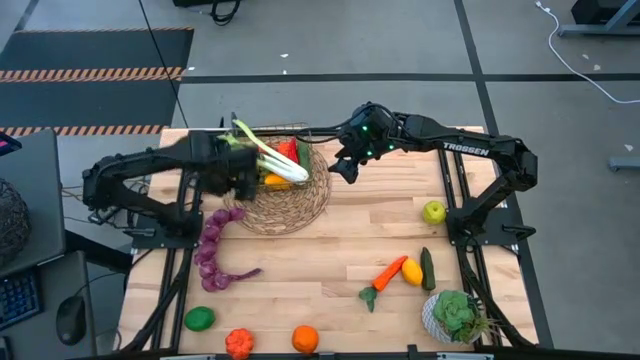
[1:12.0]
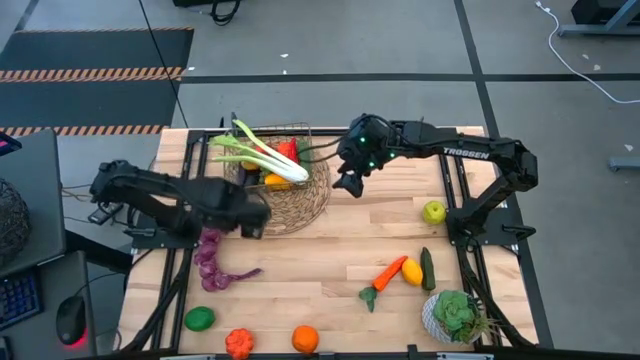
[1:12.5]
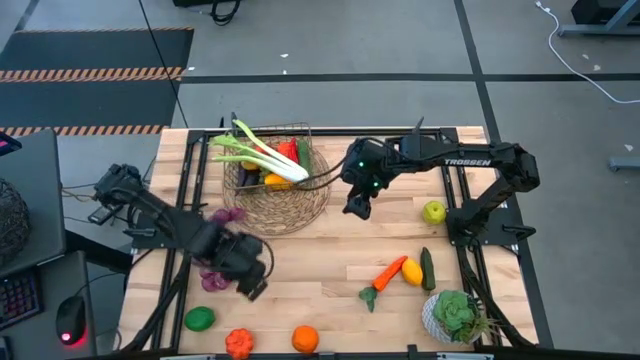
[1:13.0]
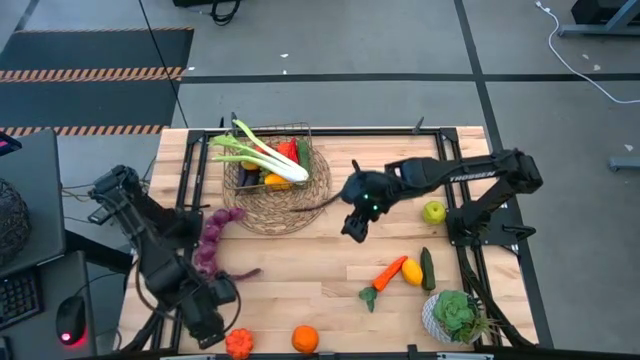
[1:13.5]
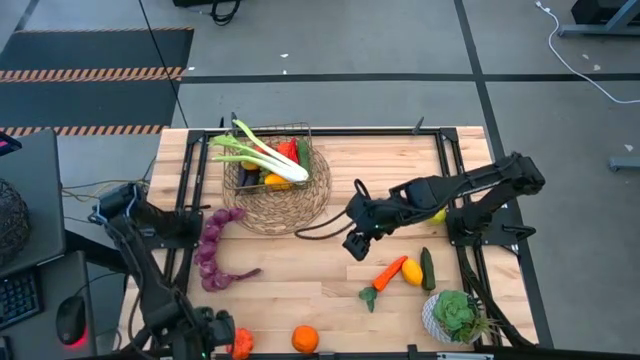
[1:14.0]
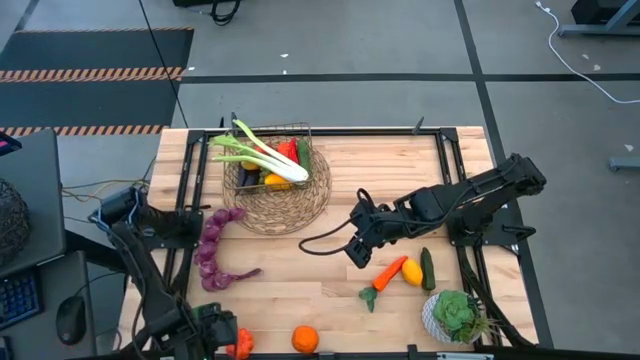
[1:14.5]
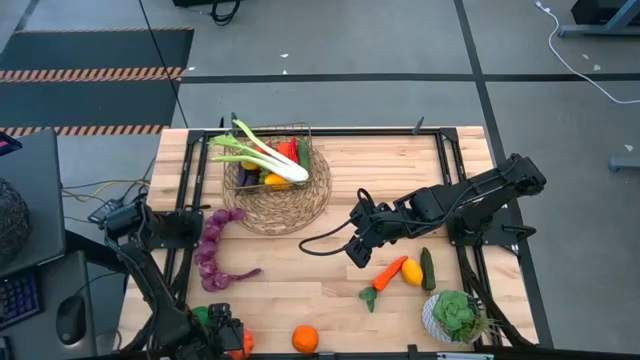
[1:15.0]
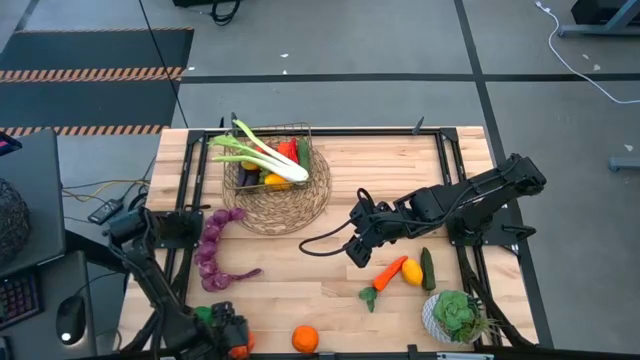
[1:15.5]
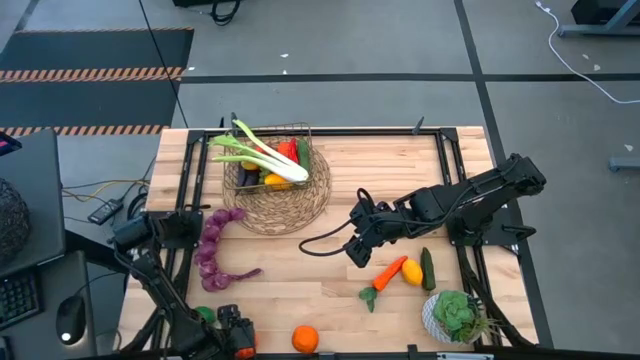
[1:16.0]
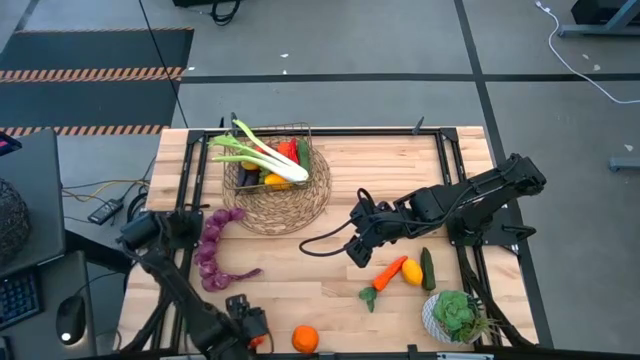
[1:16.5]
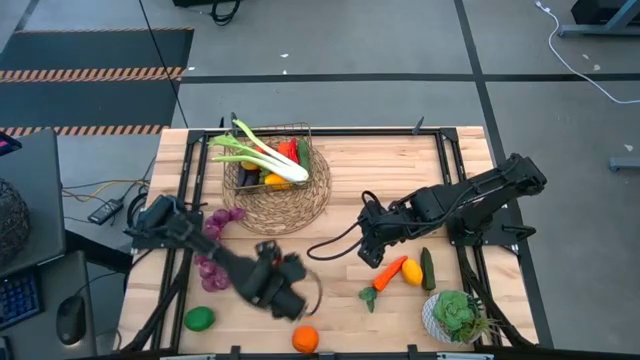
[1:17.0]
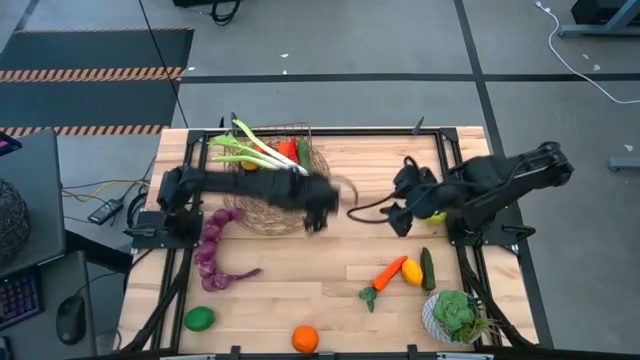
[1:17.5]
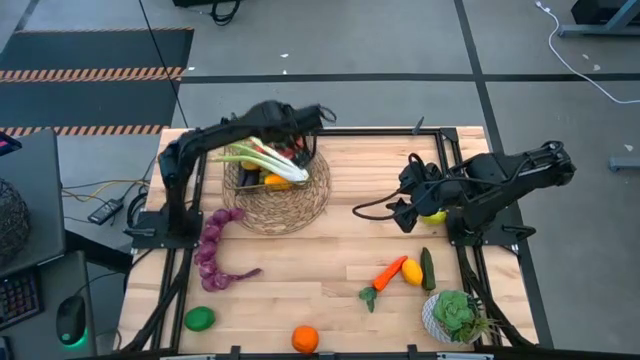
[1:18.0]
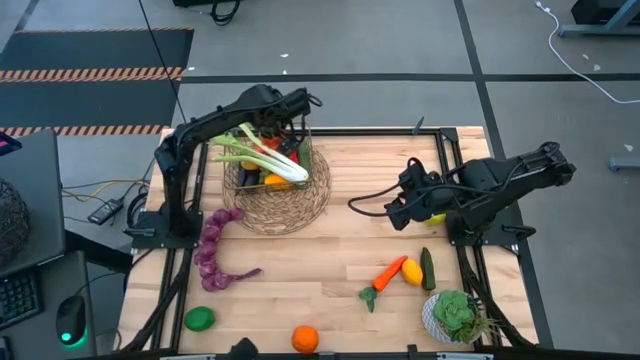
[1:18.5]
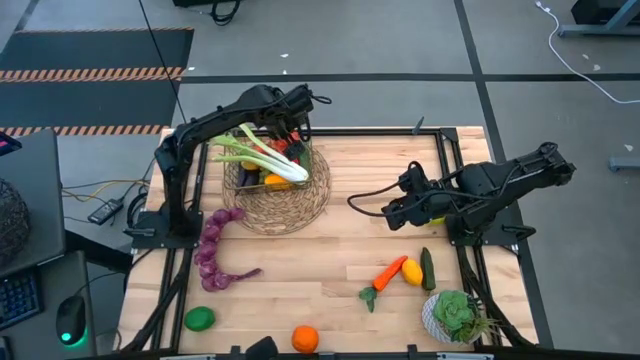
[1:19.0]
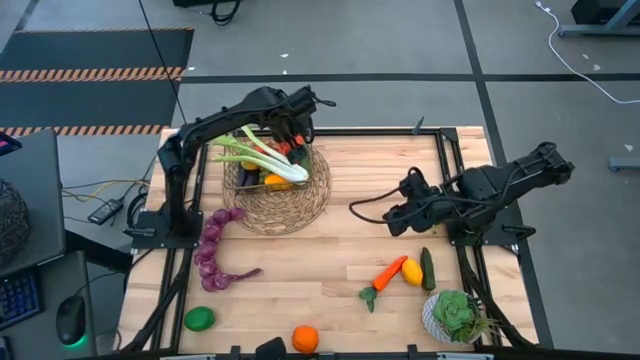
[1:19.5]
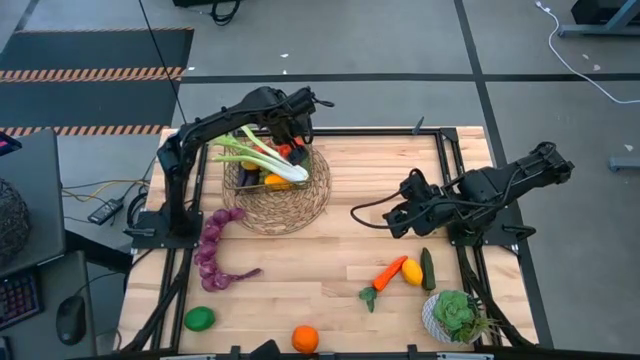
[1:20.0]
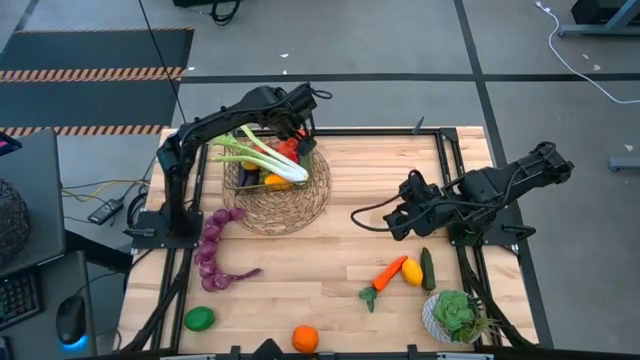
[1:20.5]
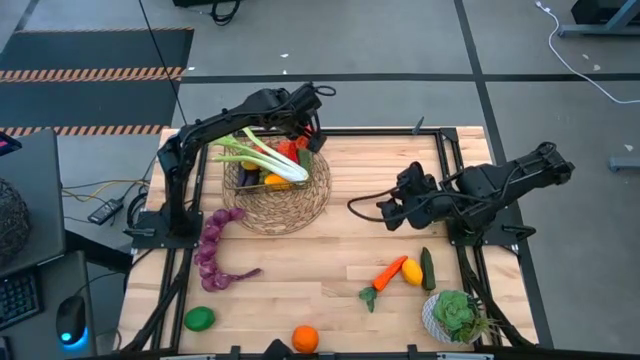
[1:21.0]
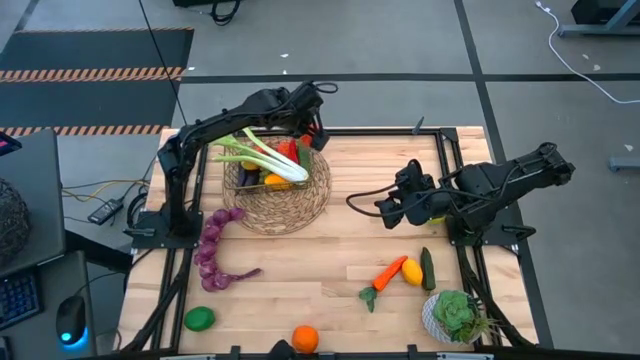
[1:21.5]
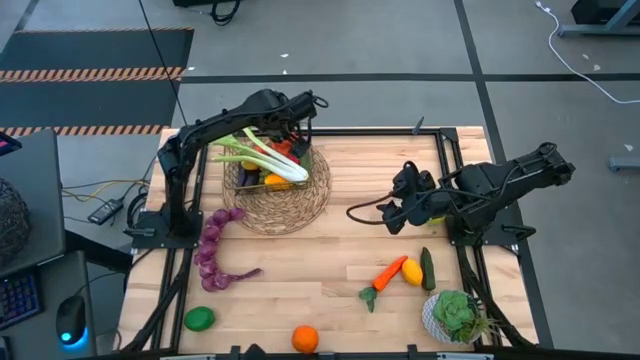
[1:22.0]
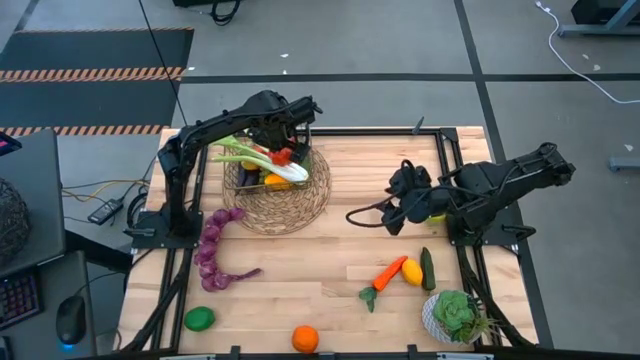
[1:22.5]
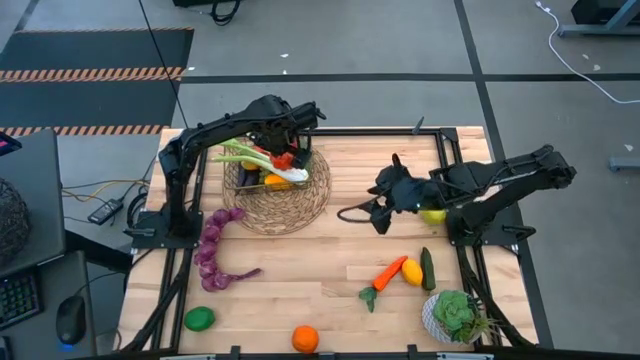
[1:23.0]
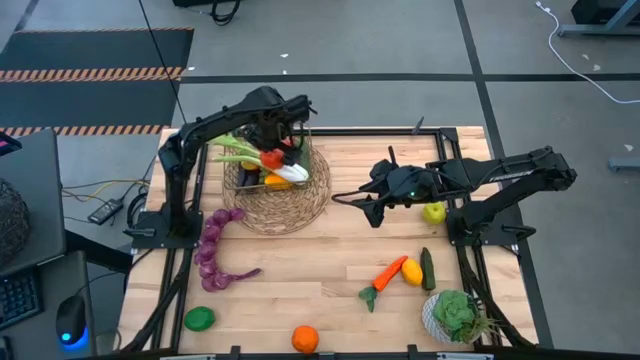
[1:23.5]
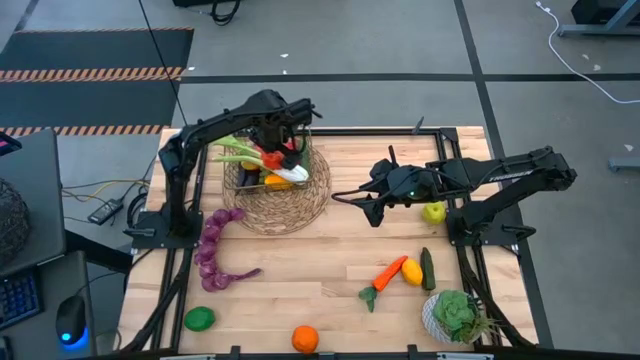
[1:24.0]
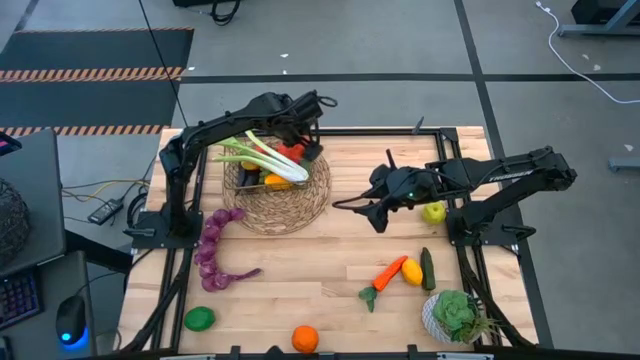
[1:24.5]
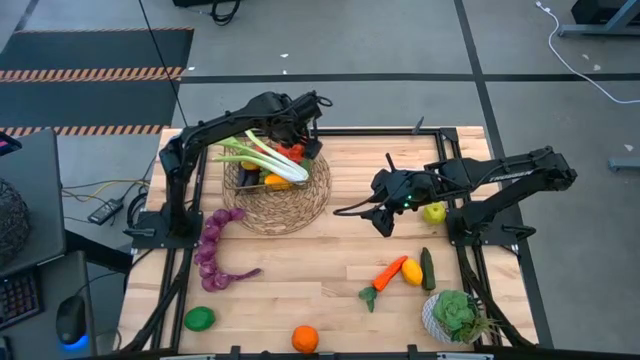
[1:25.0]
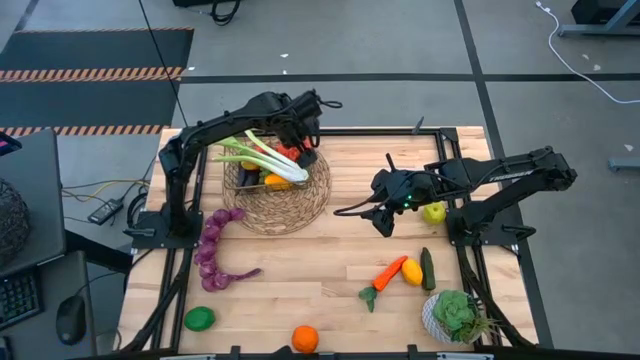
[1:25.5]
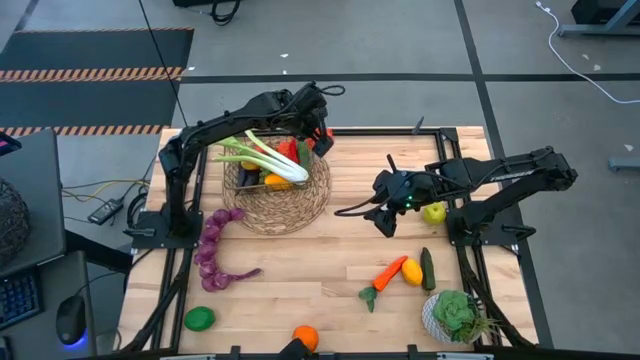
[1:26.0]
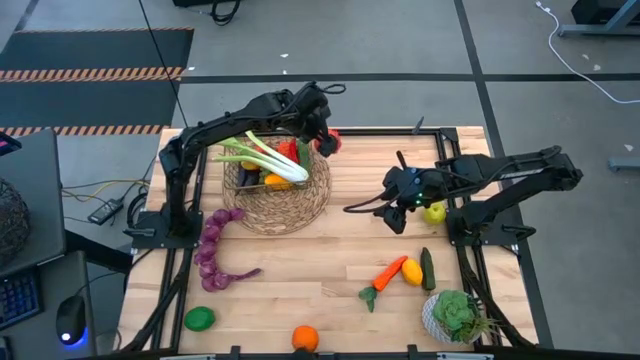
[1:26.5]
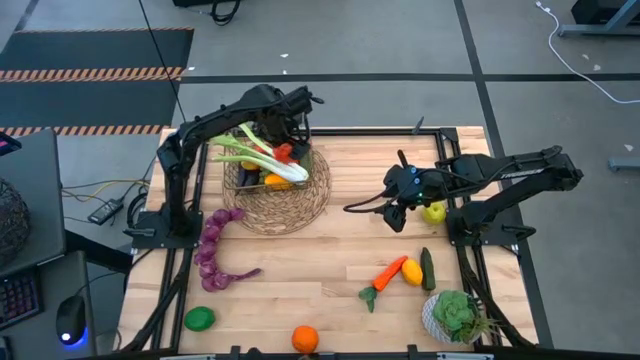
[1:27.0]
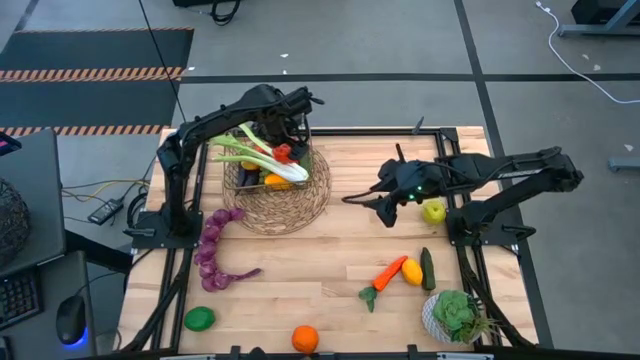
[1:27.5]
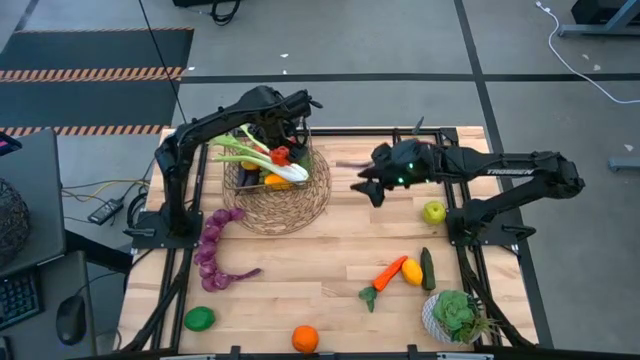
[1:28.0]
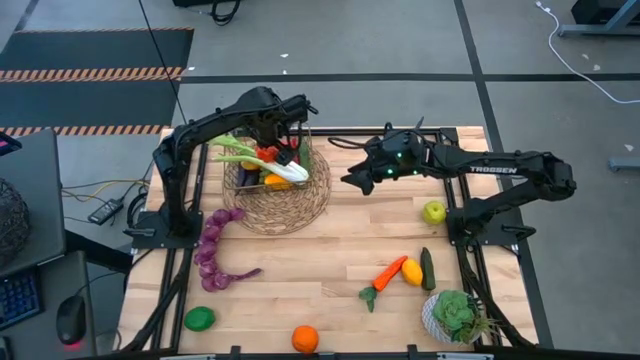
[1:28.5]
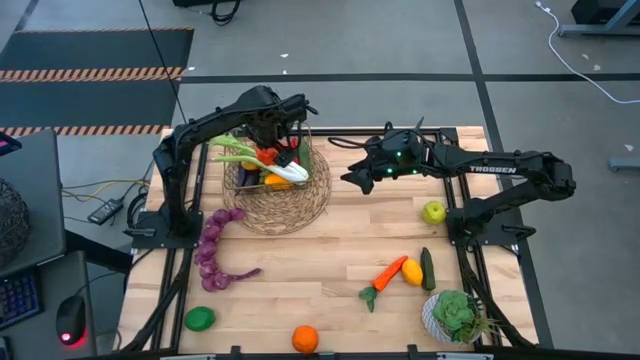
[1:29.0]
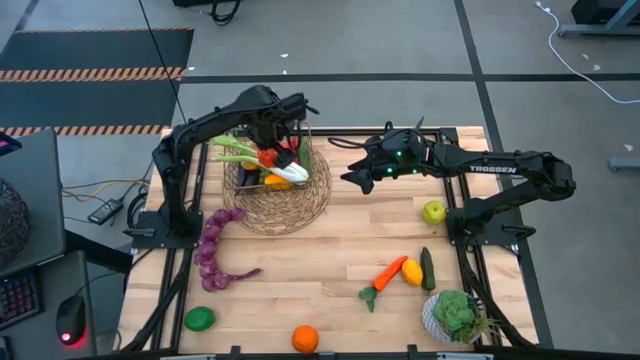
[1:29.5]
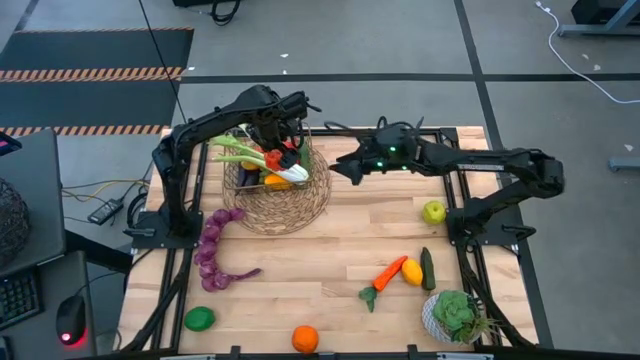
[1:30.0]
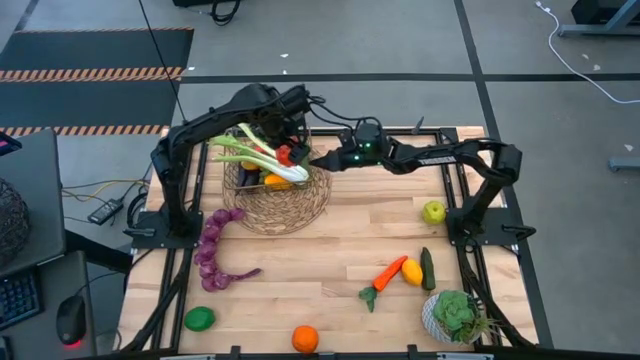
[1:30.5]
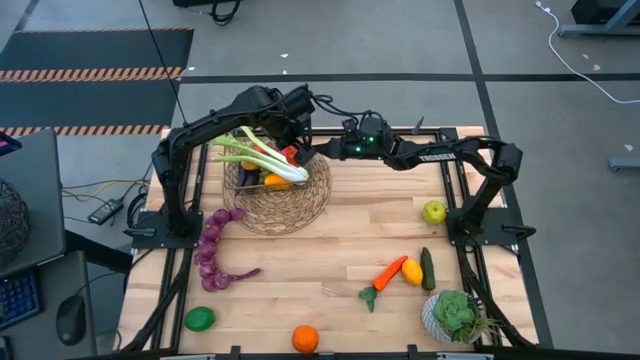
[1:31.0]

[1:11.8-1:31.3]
Task: Build produce basket
Put the orange pumpkin into the wire basket

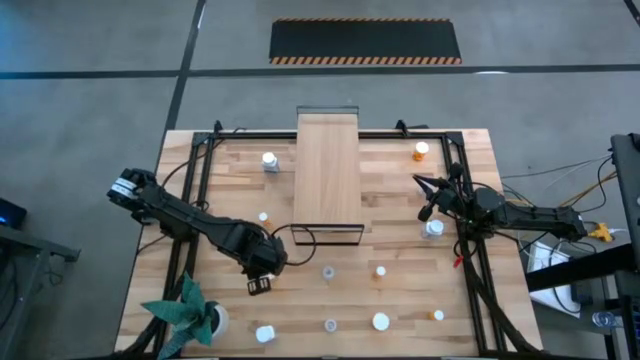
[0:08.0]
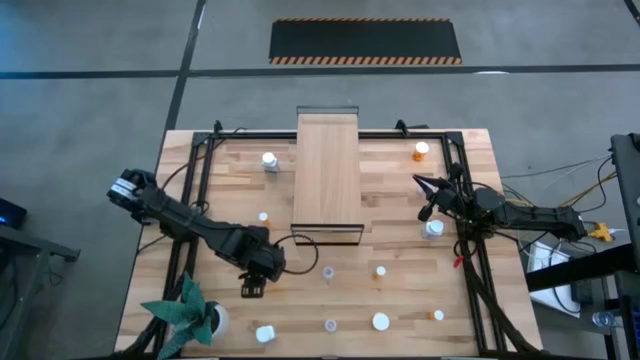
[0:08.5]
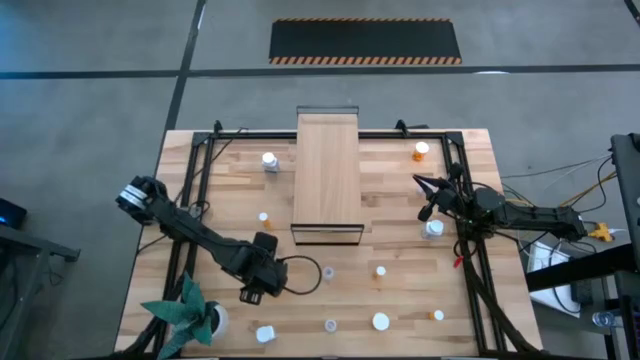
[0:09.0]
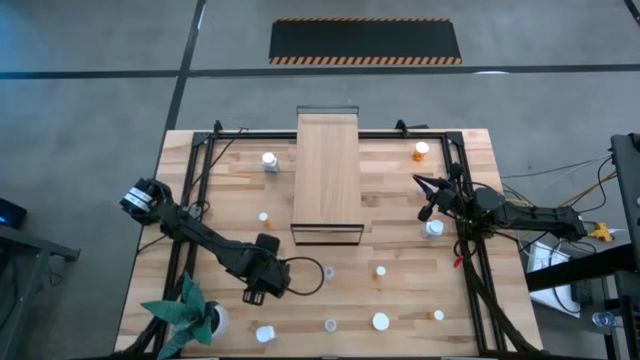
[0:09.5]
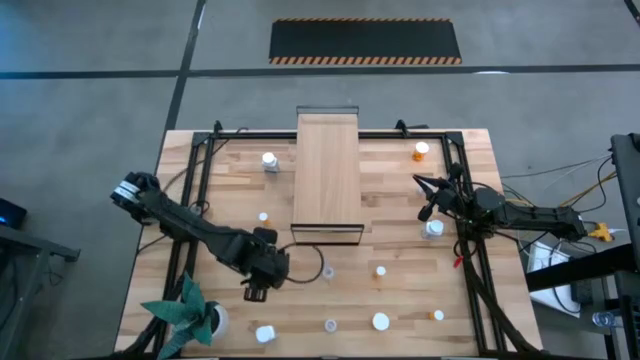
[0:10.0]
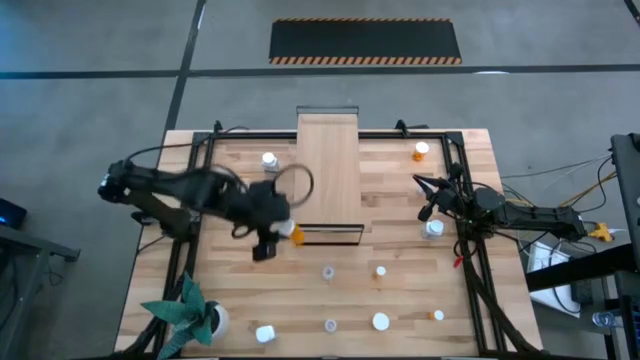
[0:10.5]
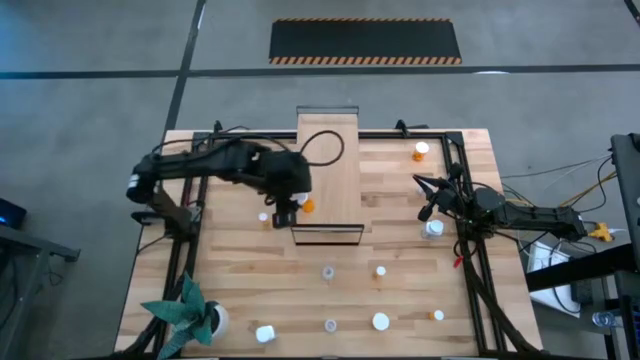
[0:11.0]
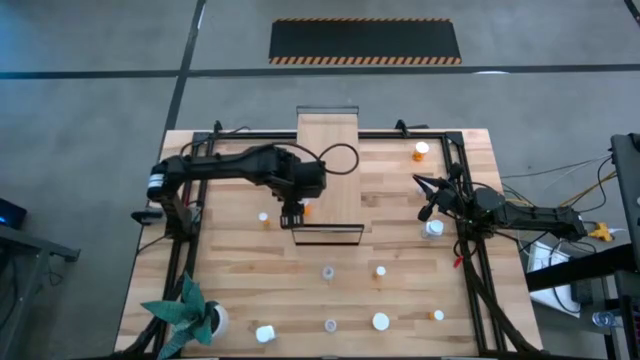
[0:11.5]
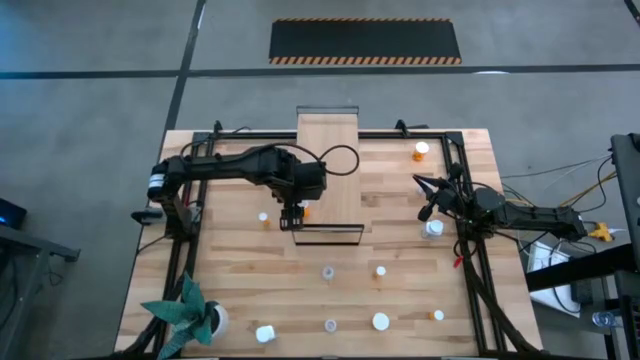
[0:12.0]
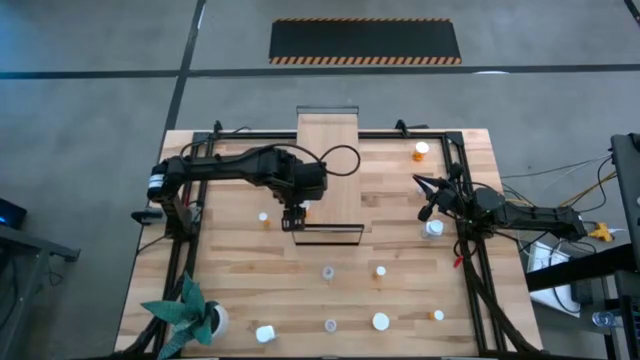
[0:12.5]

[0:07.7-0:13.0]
Task: Pick and place medicine bottles onto shelf by color
Put the middle left big orange pill bottle on the shelf
